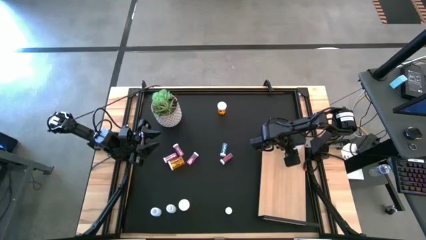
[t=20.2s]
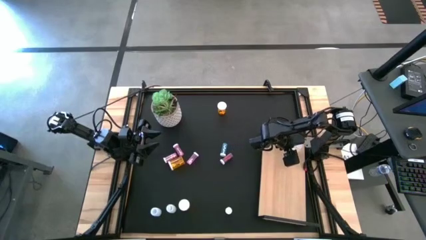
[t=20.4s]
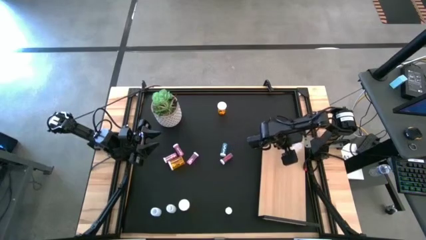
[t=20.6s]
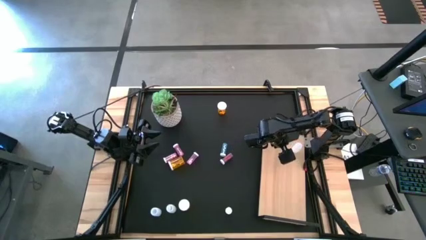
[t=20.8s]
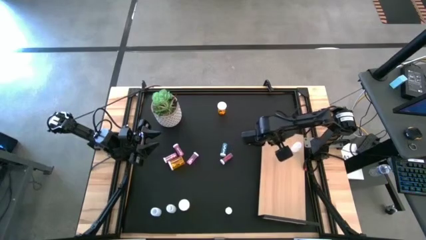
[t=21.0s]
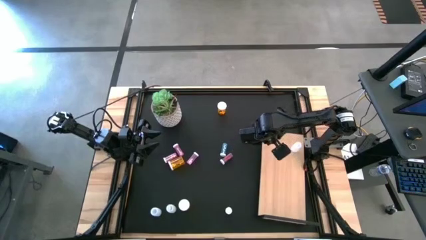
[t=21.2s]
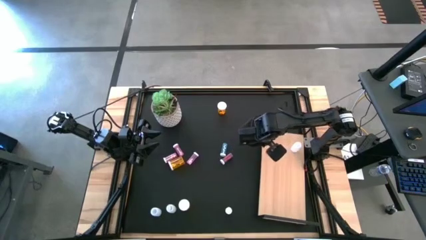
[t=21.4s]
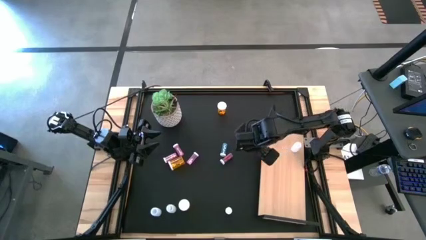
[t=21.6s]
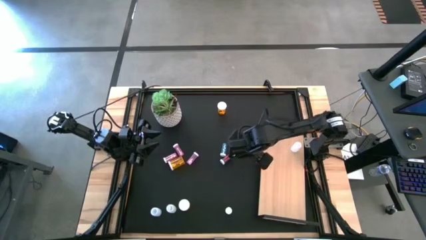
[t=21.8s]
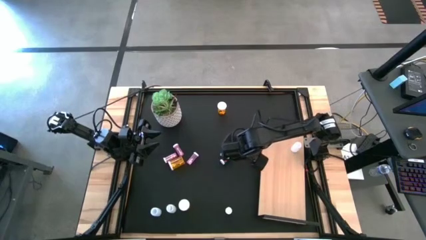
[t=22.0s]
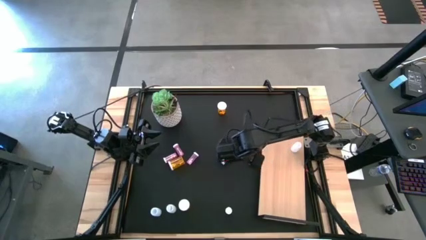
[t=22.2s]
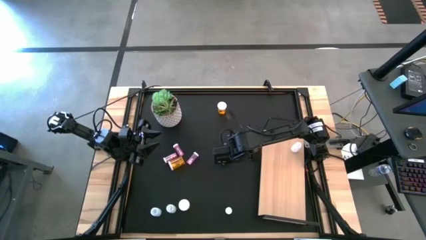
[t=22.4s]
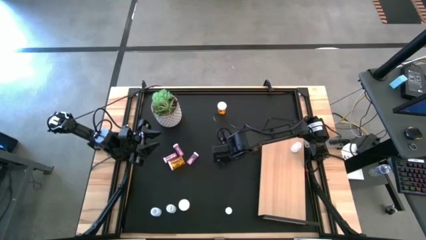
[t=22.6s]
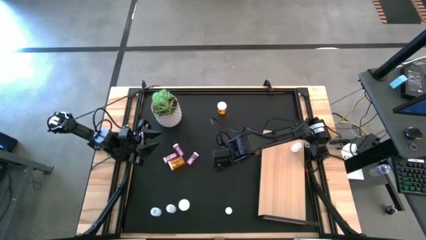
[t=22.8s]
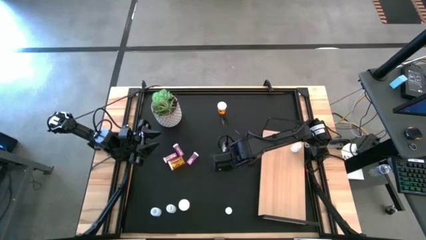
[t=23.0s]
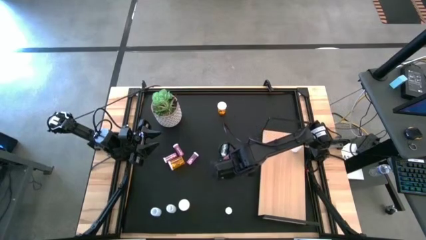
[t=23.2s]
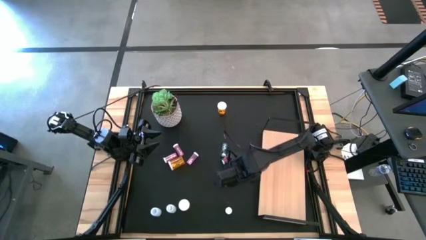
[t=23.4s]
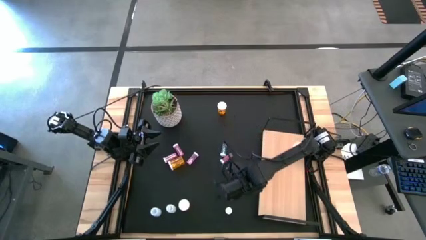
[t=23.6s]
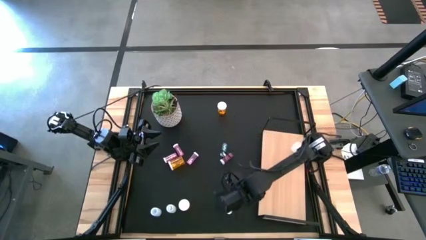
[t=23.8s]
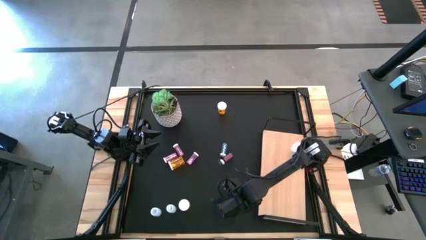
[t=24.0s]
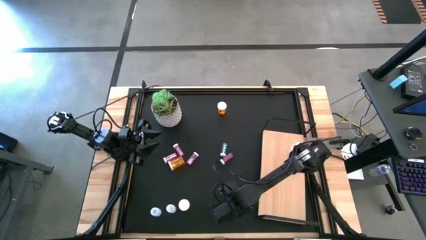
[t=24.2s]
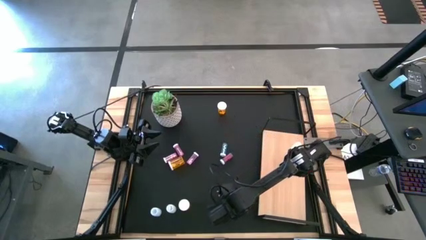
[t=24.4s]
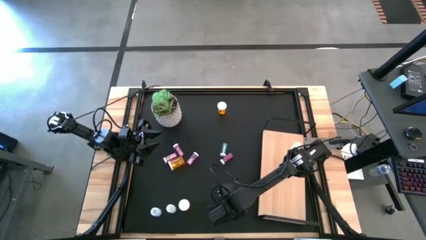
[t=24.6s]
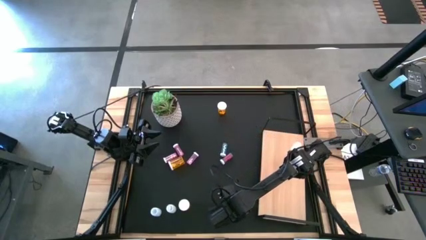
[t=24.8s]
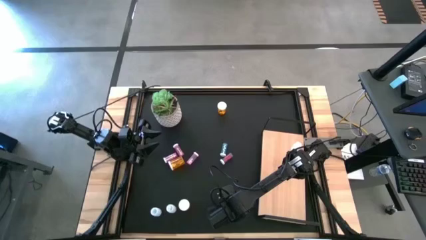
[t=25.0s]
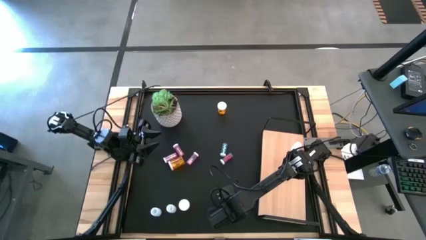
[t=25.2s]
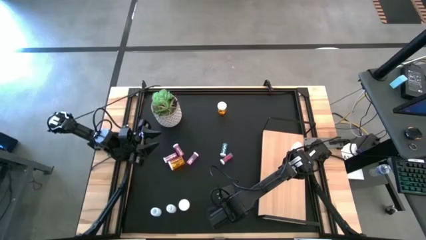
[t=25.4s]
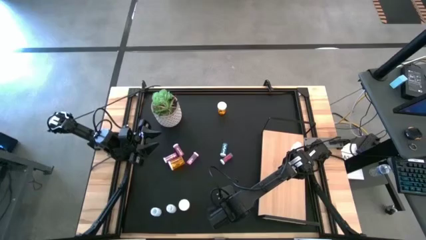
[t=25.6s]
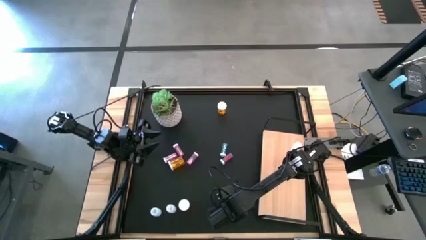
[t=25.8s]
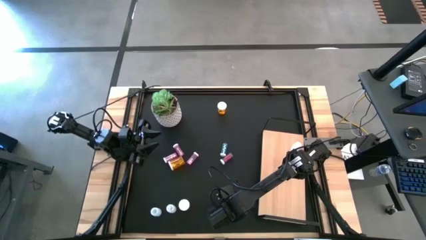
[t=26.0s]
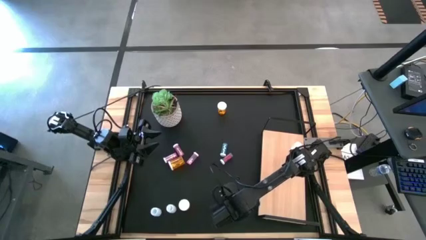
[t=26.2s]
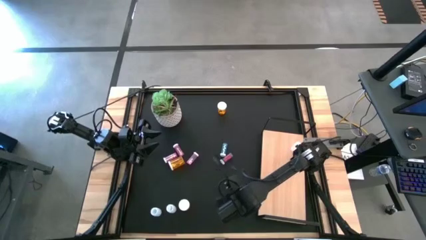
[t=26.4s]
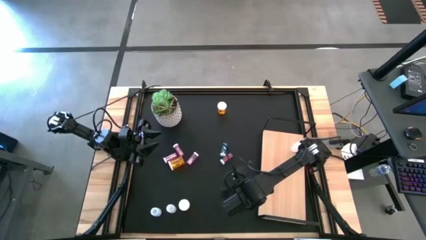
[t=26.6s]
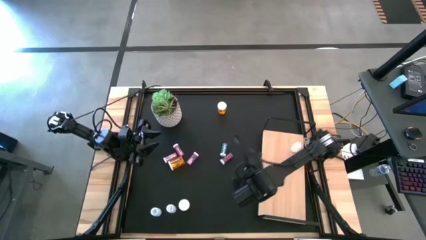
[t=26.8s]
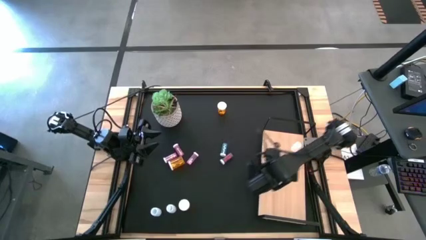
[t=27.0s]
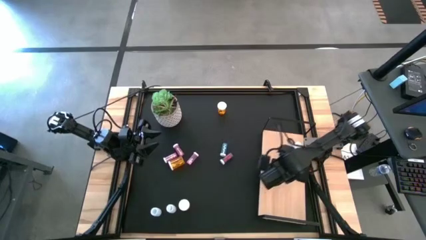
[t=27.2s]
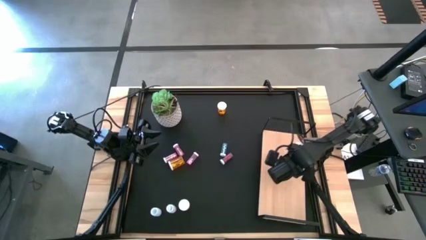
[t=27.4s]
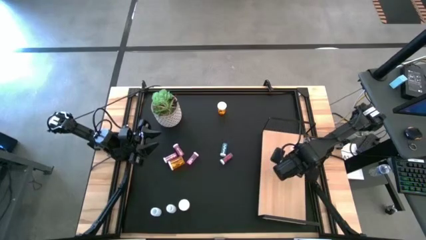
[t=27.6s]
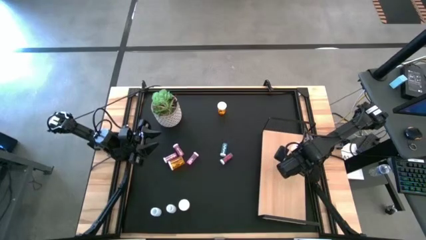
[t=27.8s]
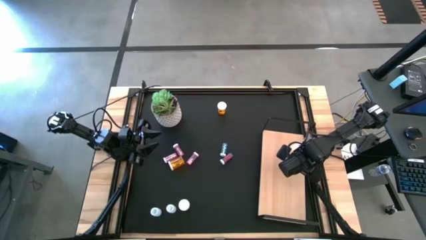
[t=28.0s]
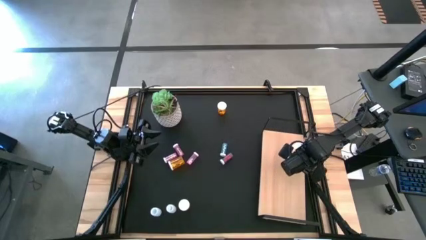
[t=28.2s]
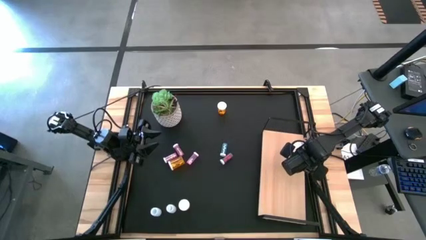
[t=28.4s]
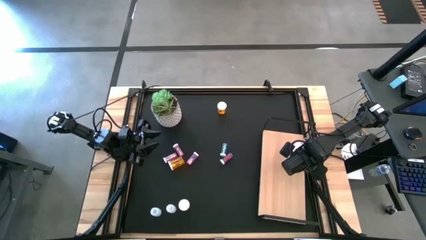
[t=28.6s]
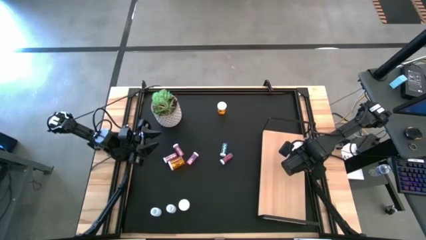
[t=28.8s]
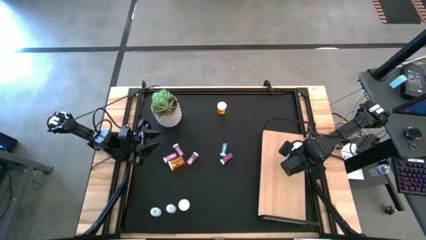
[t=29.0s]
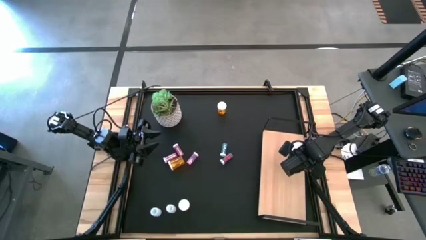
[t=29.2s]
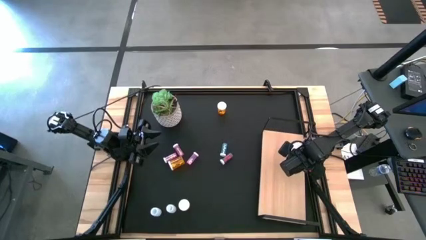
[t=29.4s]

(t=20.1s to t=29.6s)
Task: Pick and place medicine bottles onto shelf by color
Put the bottom blue pill bottle on the shelf

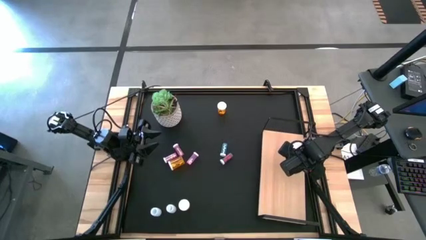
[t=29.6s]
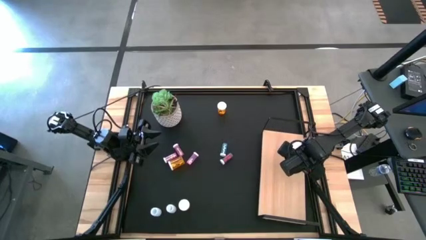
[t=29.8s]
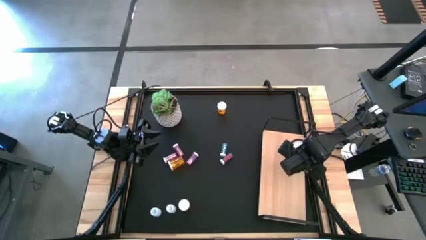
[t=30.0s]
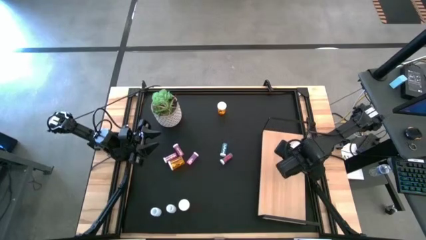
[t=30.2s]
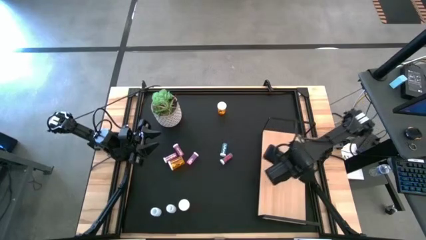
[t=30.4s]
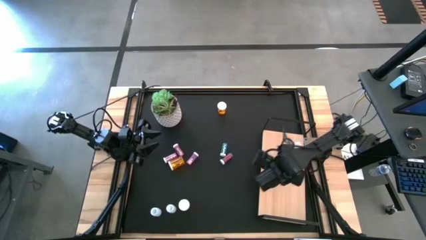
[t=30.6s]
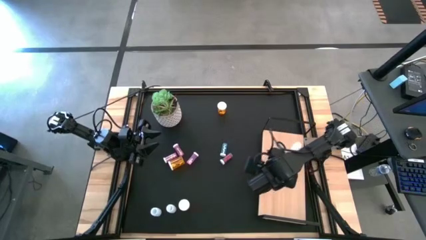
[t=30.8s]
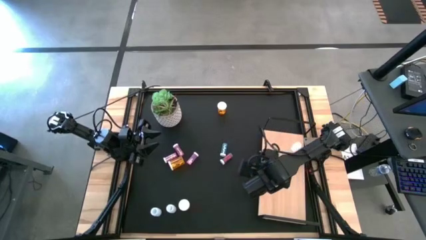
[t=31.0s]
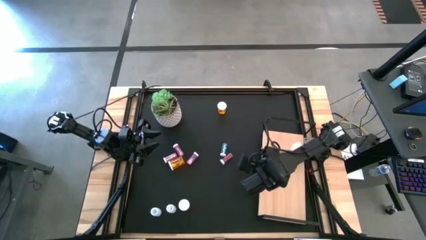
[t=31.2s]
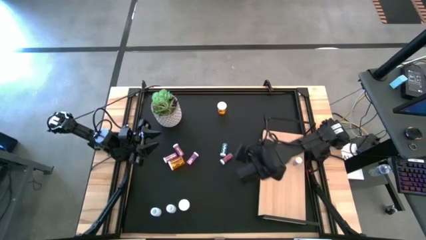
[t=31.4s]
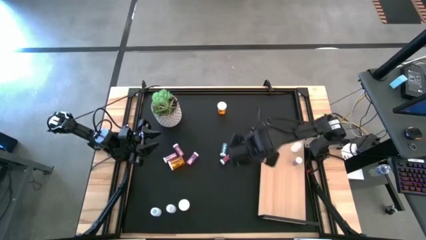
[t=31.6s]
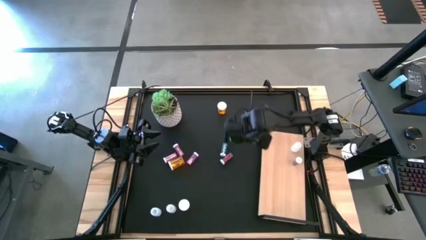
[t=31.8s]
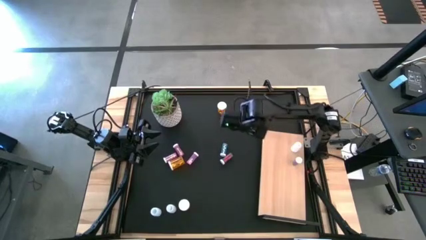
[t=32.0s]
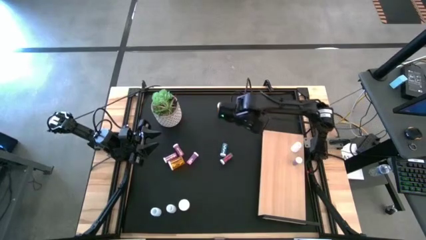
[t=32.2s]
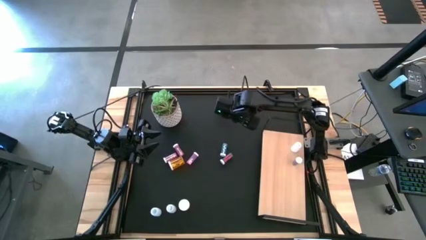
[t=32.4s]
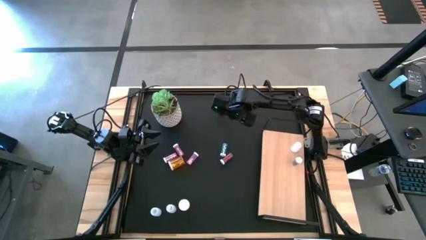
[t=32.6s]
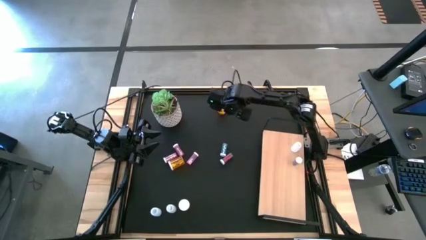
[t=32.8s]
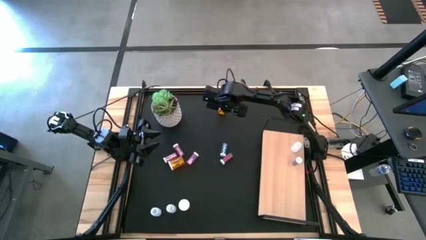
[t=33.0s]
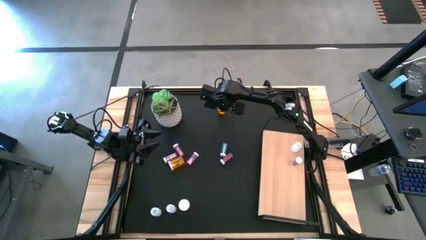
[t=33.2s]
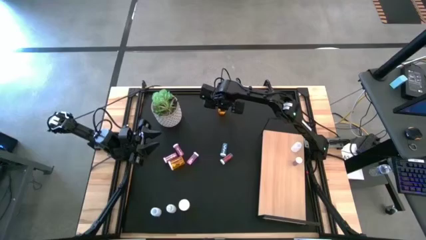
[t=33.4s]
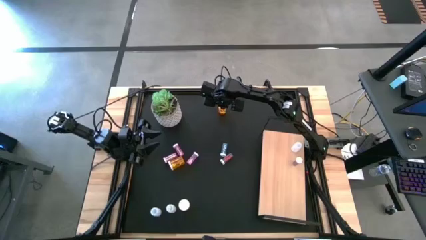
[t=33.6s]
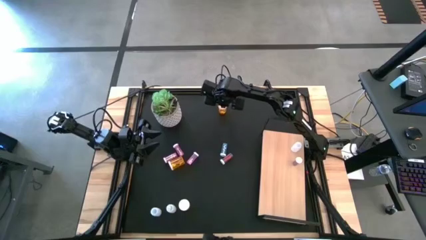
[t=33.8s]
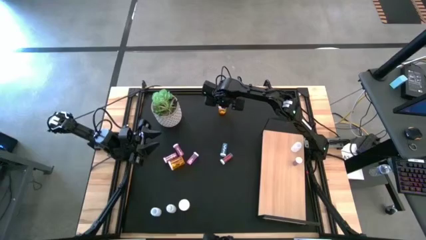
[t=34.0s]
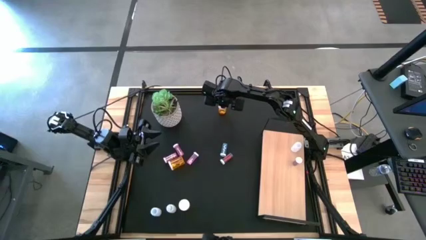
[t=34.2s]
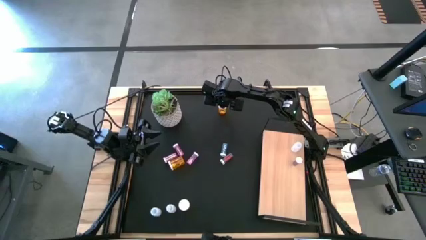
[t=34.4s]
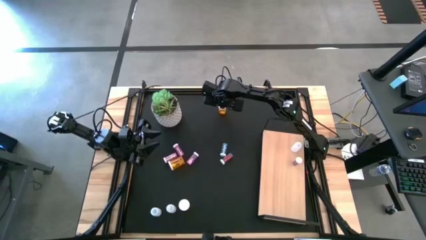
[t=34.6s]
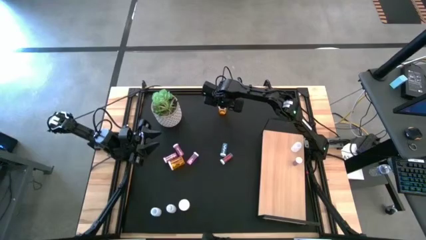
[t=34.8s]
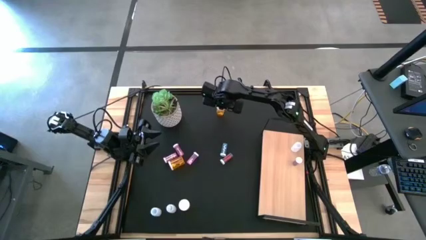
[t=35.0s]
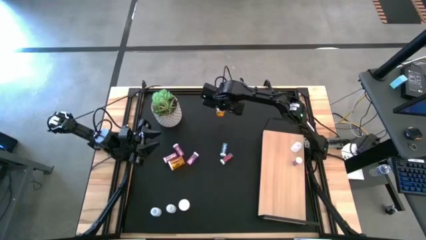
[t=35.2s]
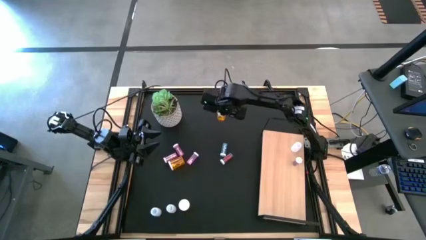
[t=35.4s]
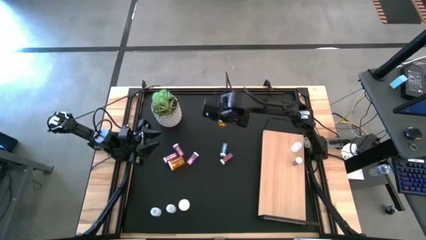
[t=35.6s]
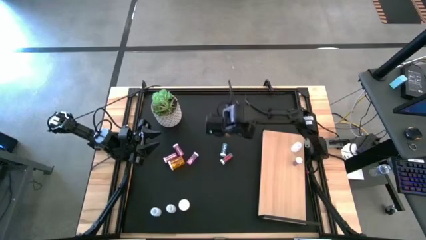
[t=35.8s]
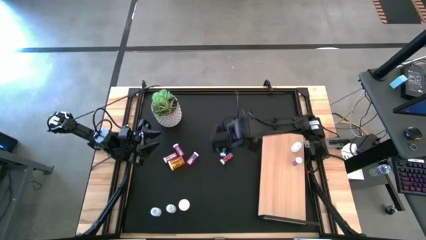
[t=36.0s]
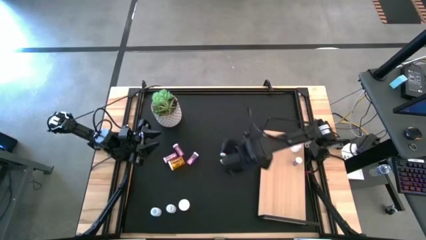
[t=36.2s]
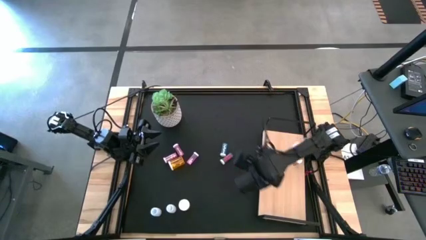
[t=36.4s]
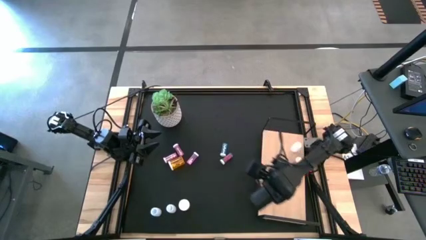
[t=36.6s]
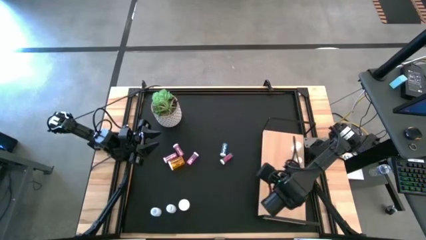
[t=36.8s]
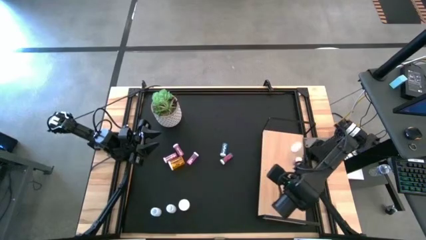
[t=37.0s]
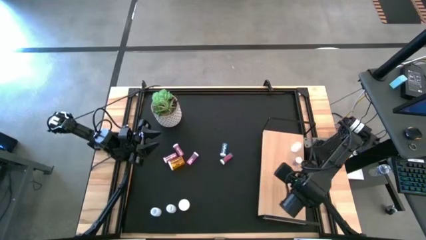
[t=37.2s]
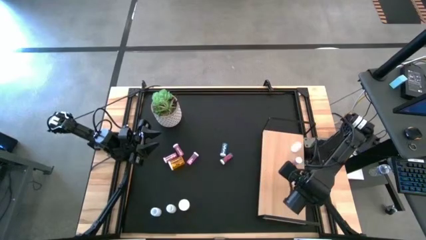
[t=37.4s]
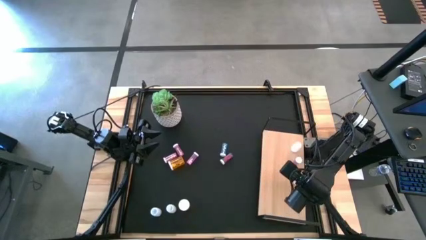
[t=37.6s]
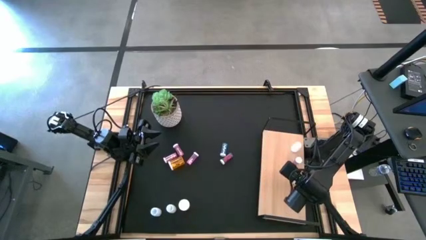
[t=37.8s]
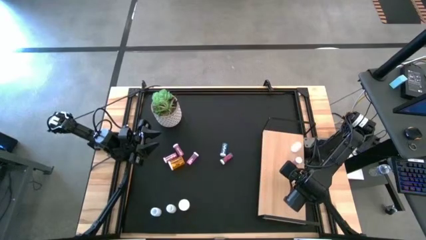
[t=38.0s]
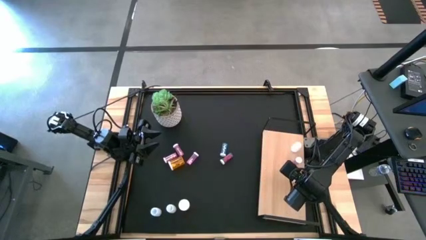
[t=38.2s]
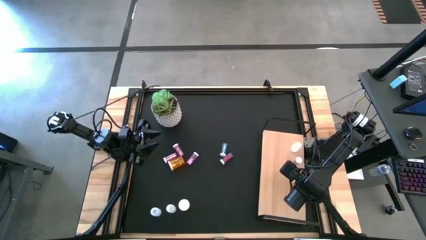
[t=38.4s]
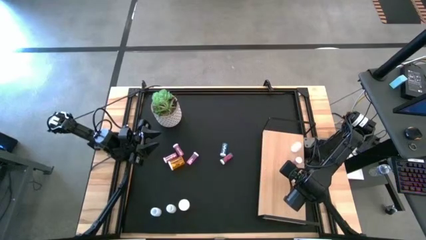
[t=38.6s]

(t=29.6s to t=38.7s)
Put the top orange pill bottle on the shelf
